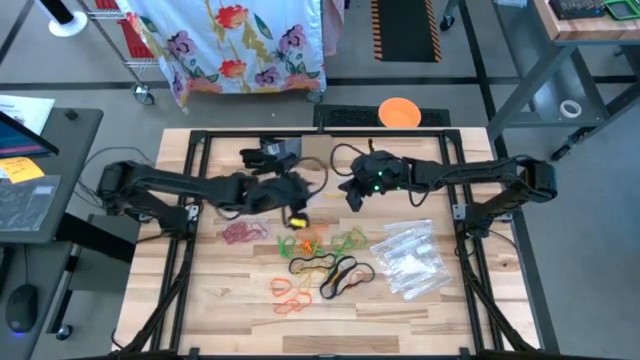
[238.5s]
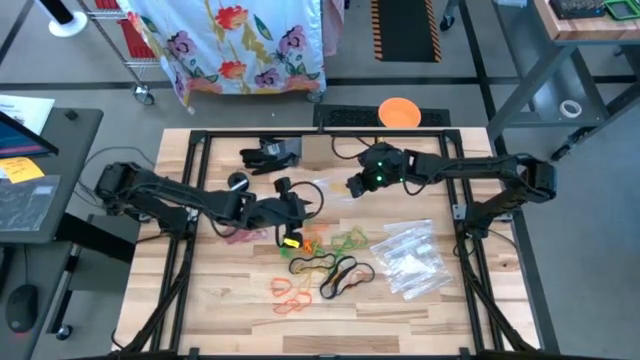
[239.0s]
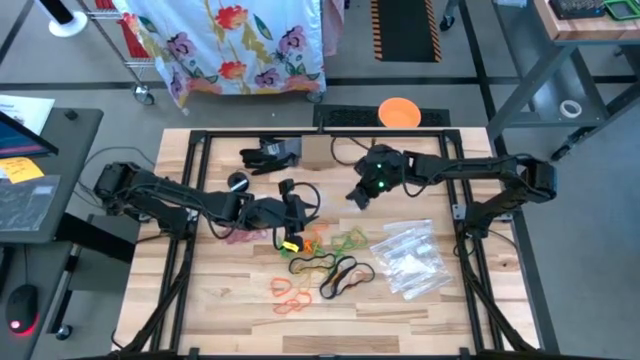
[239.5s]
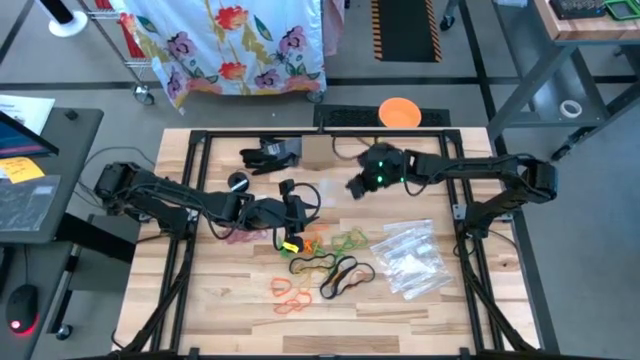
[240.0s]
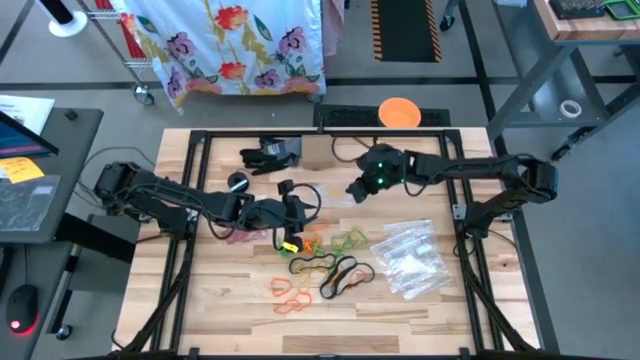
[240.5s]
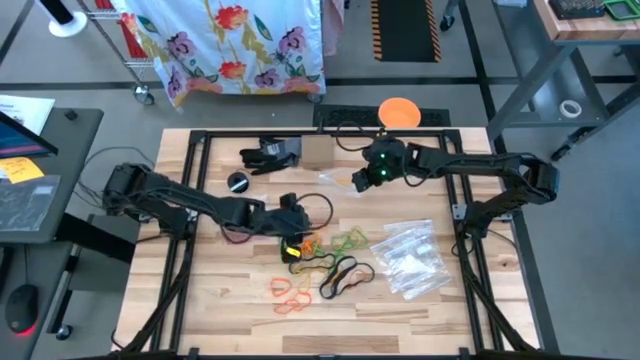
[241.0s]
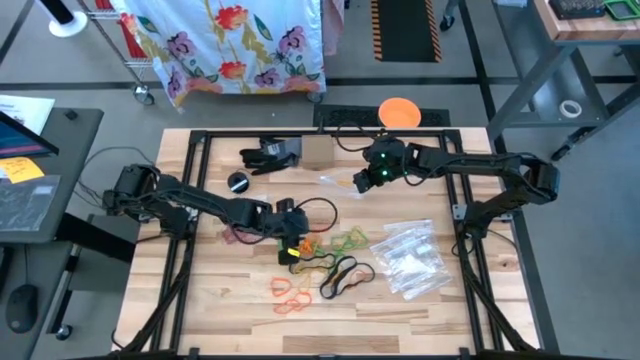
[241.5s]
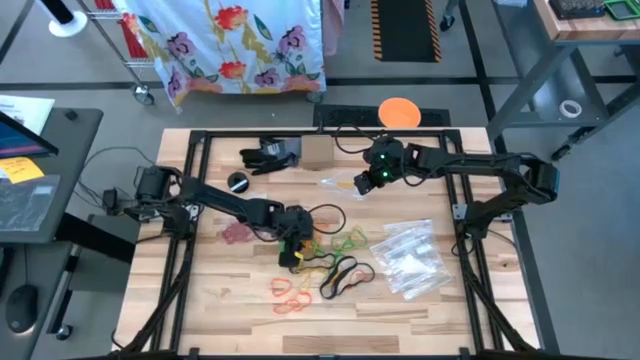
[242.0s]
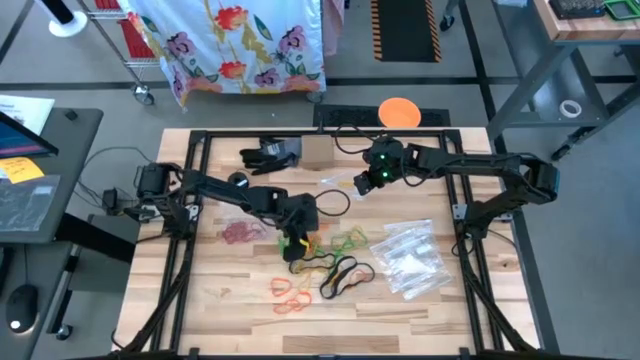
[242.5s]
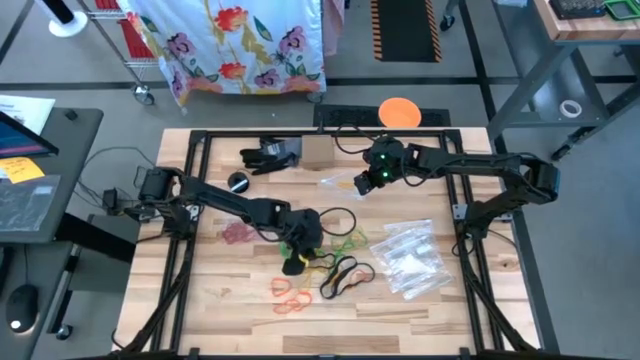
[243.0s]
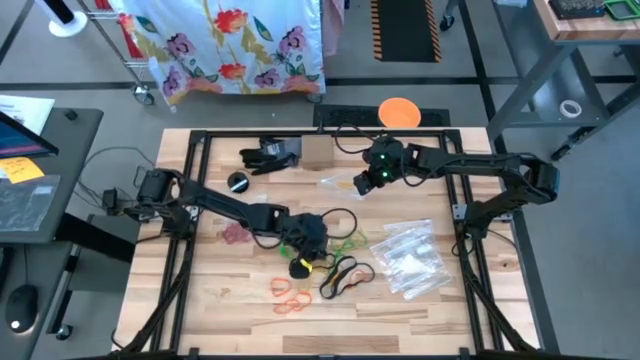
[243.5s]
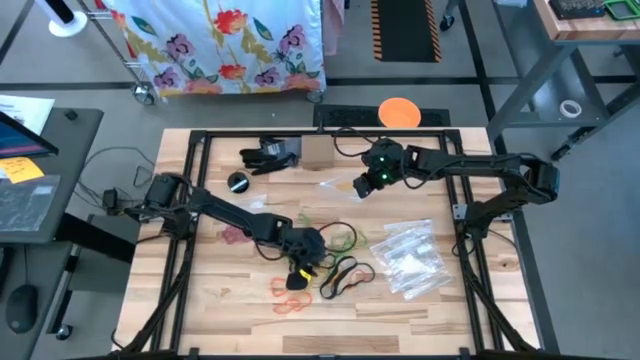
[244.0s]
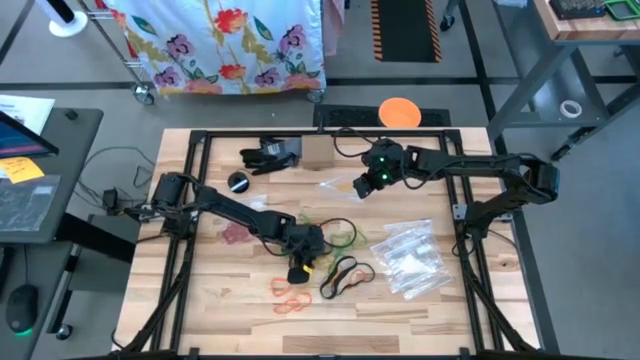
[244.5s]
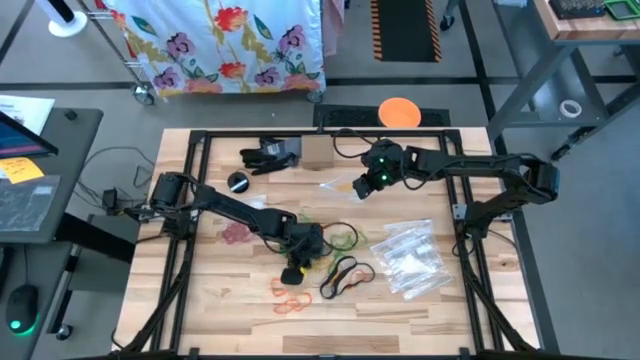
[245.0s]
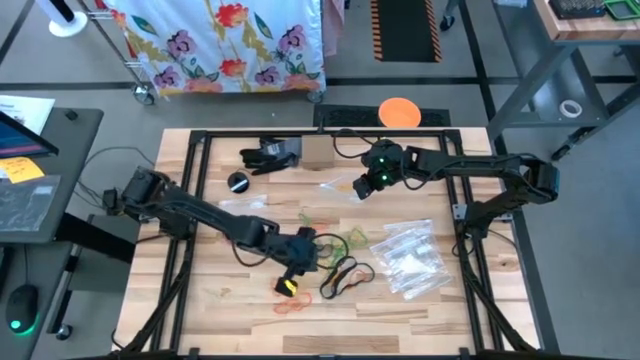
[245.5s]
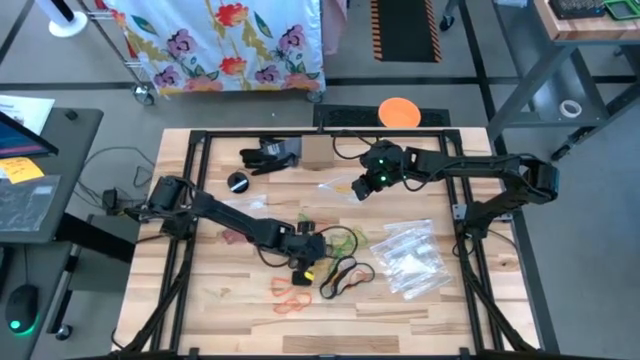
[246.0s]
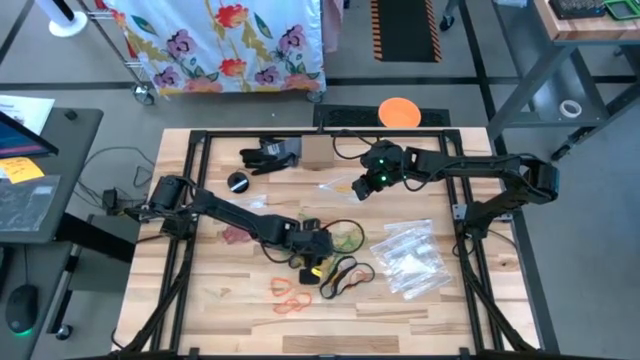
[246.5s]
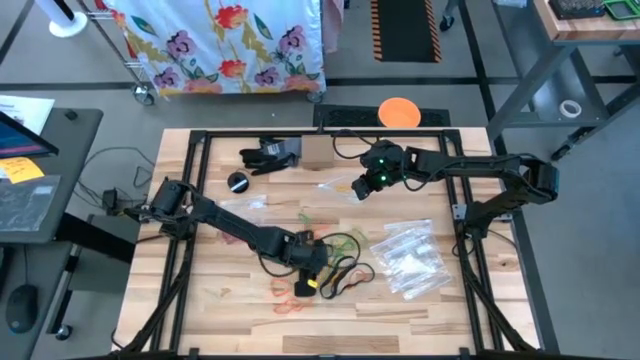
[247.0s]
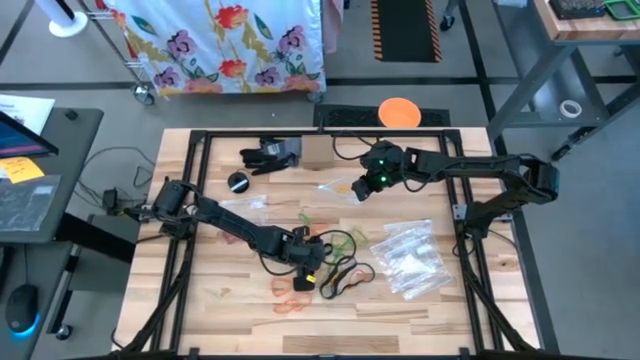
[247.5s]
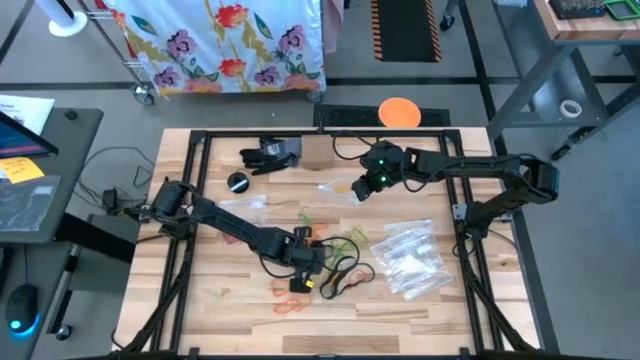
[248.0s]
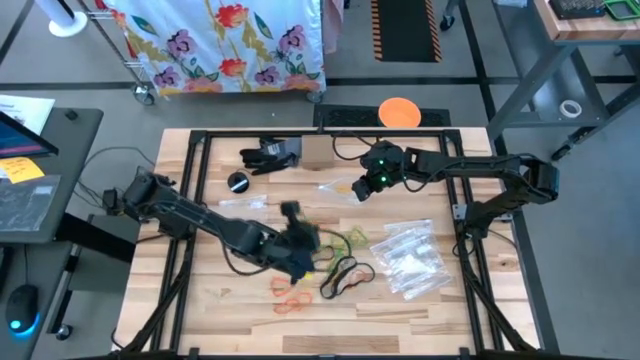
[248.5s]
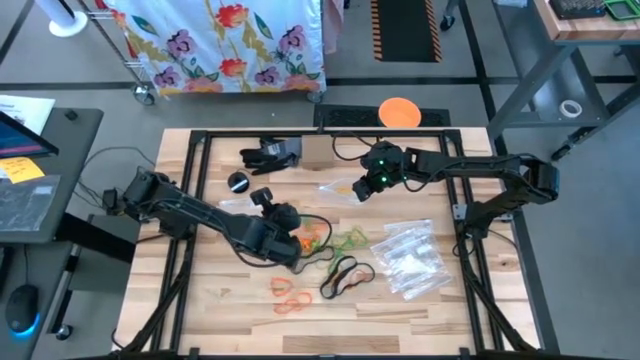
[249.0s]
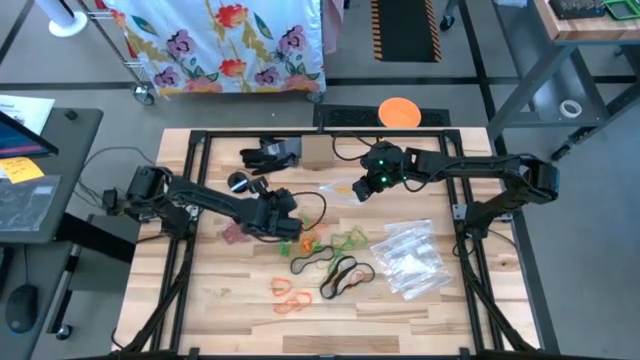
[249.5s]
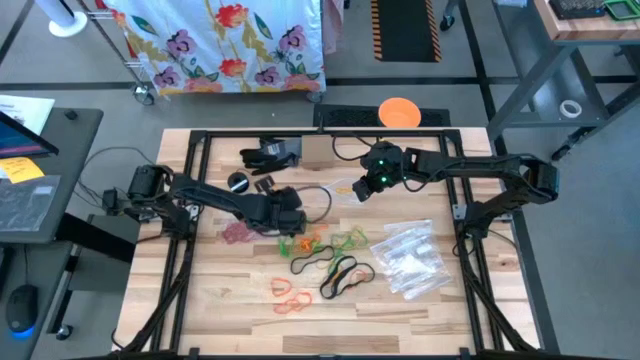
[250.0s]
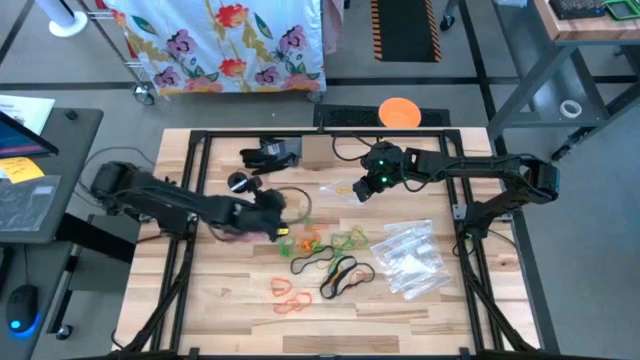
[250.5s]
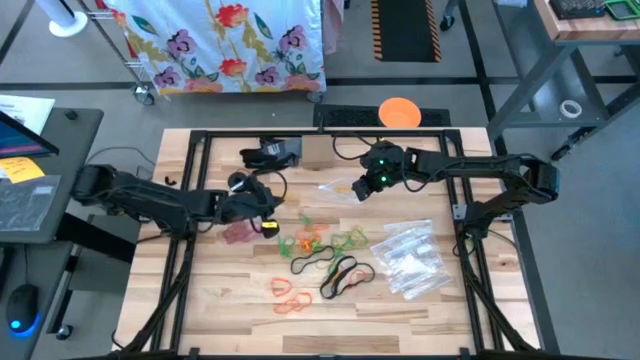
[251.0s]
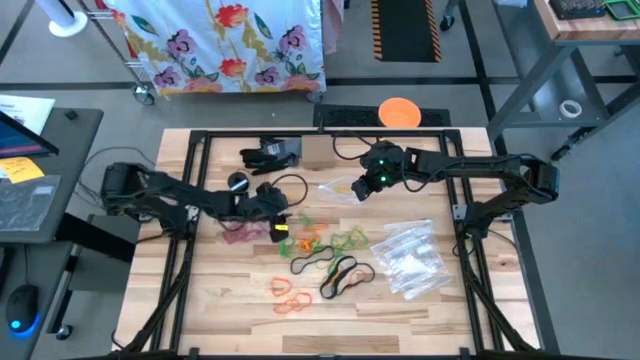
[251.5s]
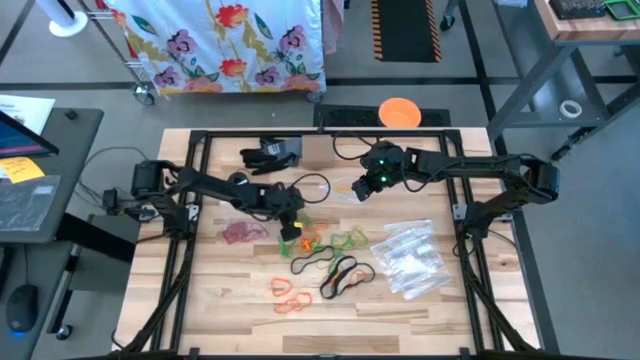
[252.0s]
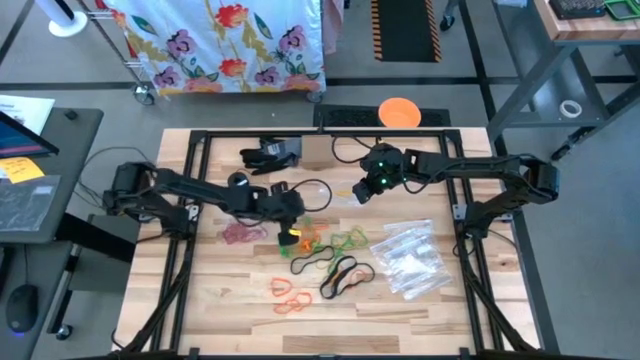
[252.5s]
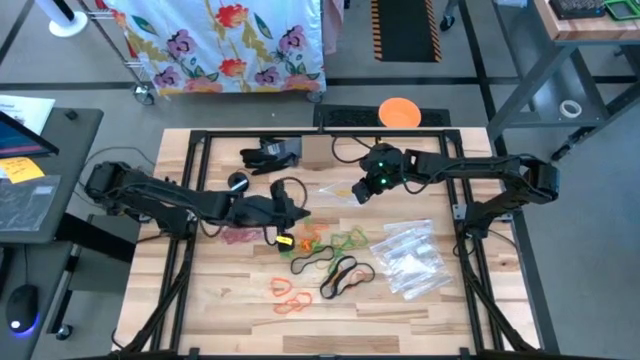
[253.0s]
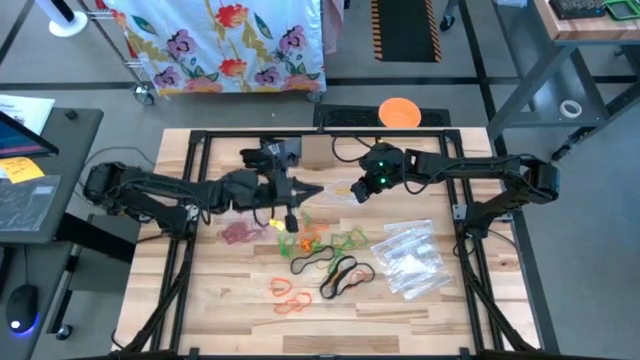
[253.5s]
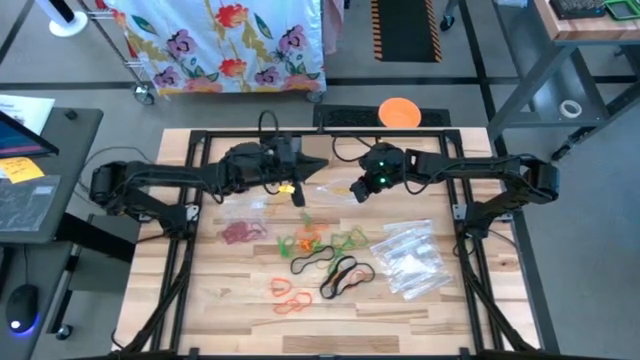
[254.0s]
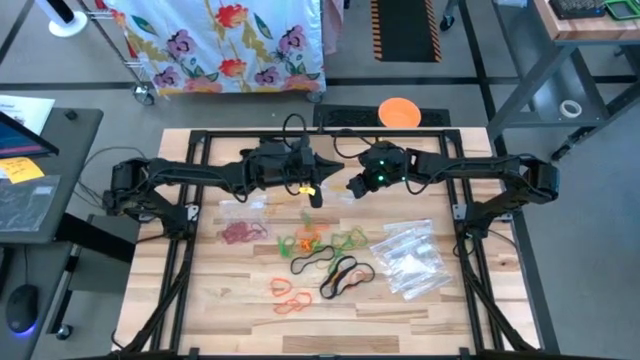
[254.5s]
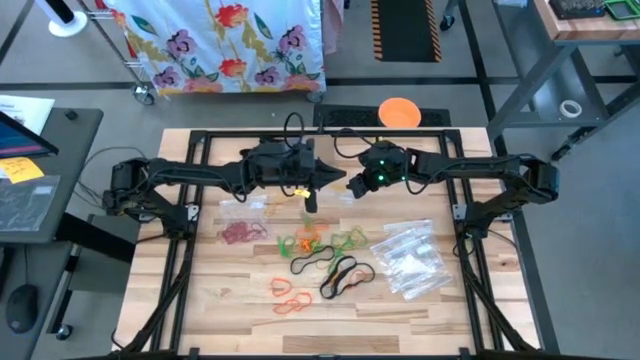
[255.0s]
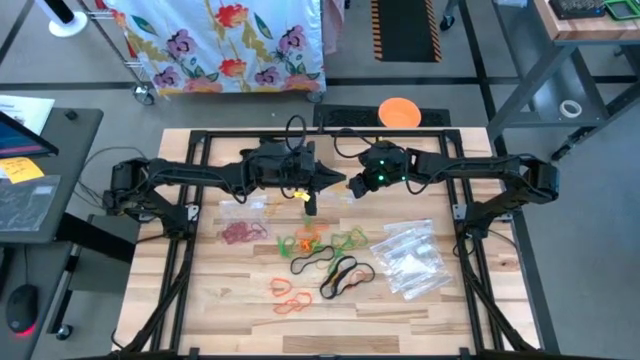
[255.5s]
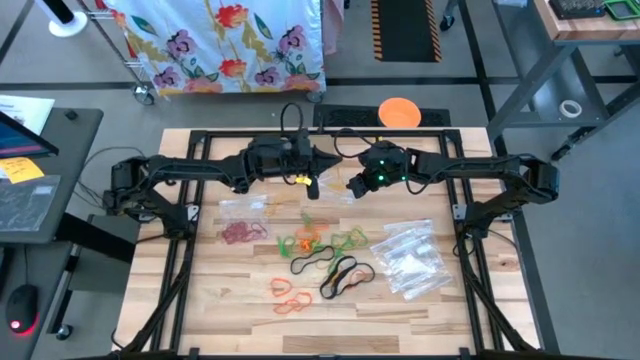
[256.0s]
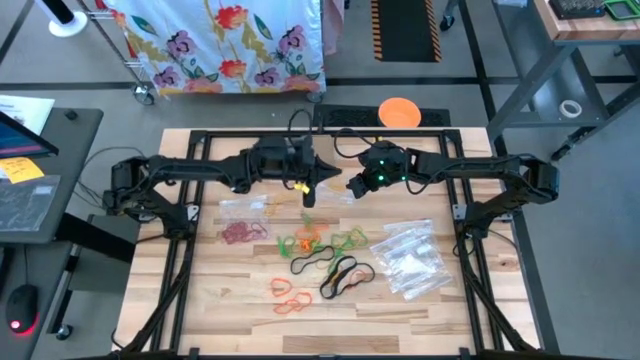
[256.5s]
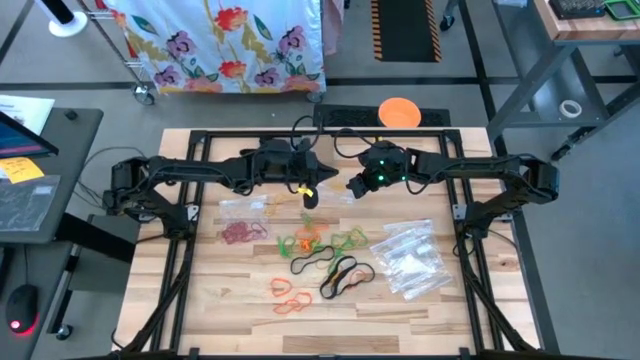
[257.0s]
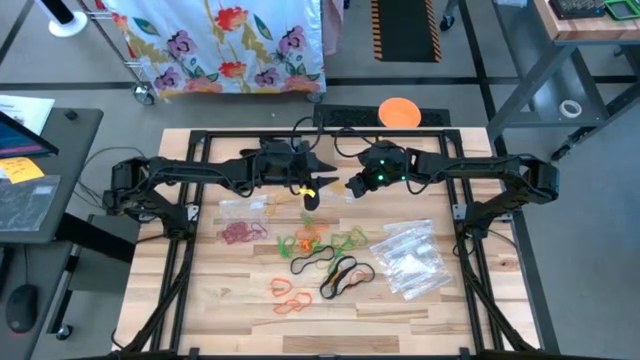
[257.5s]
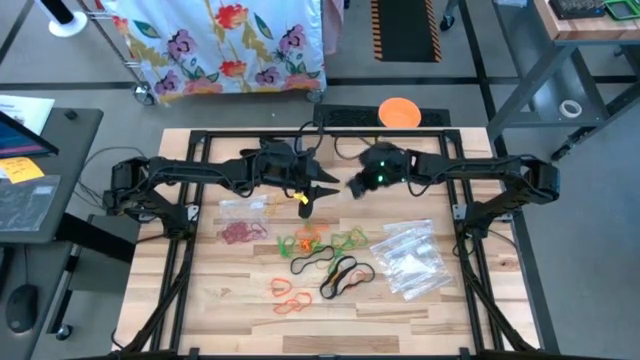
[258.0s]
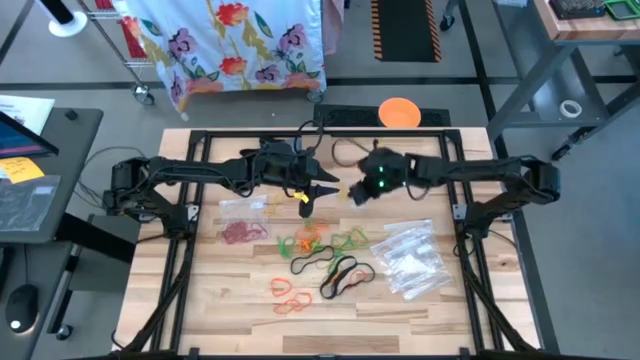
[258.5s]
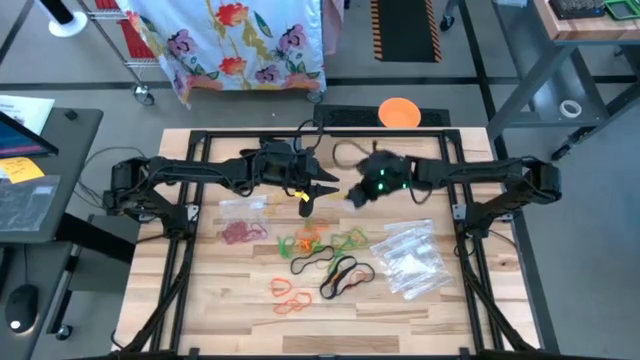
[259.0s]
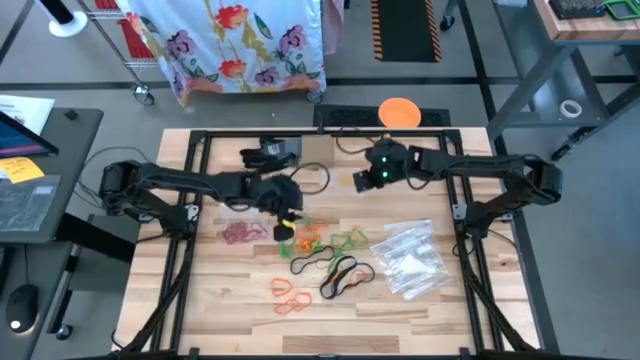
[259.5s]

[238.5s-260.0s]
Task: Sort rubber bands
Put the yellow rubber band into the transparent zip bag

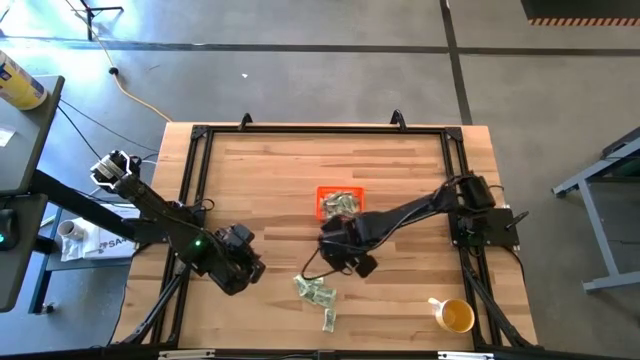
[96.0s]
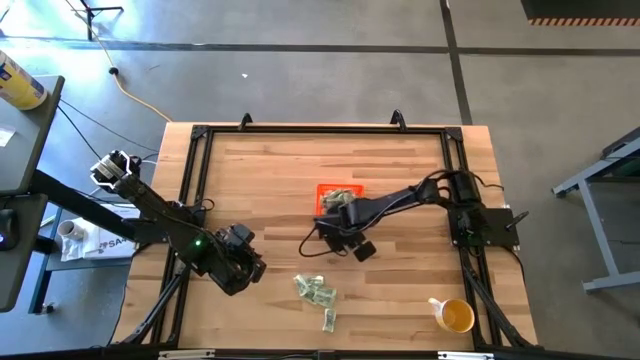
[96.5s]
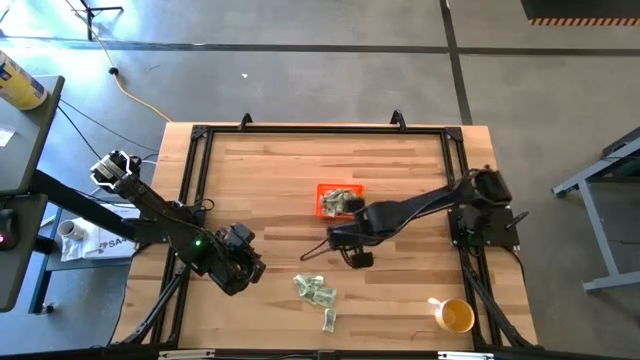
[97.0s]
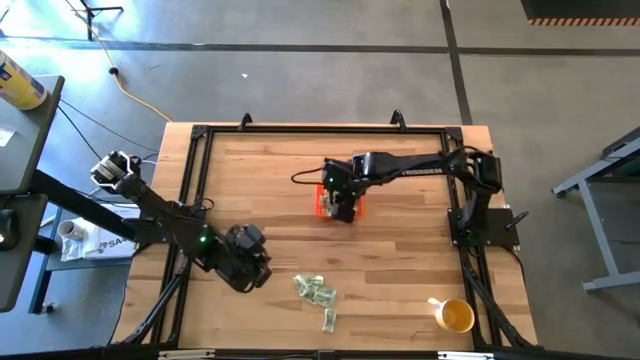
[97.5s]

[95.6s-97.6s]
Task: Pick and place Stevia / Truvia into bins
Put the stevia packet into the orange bin
